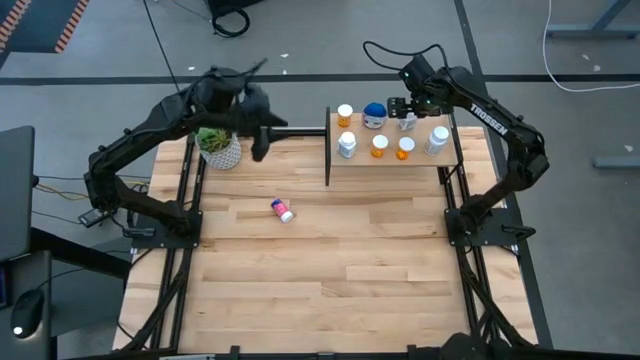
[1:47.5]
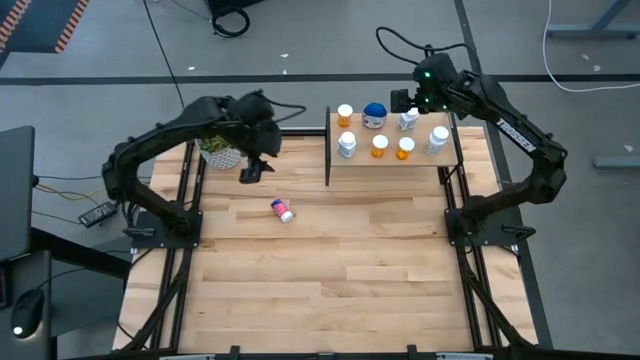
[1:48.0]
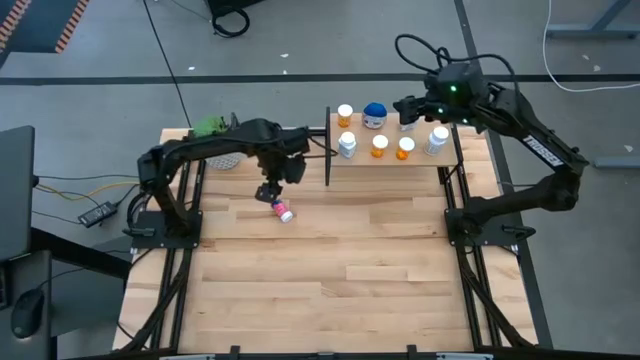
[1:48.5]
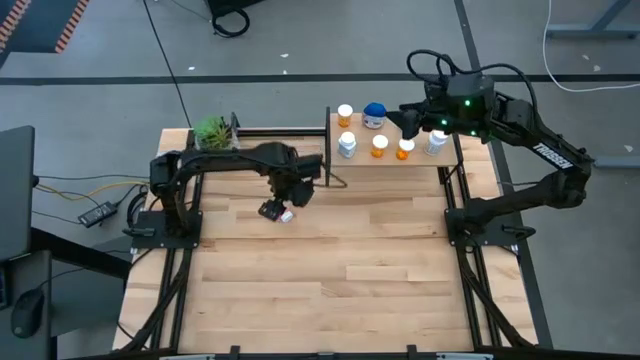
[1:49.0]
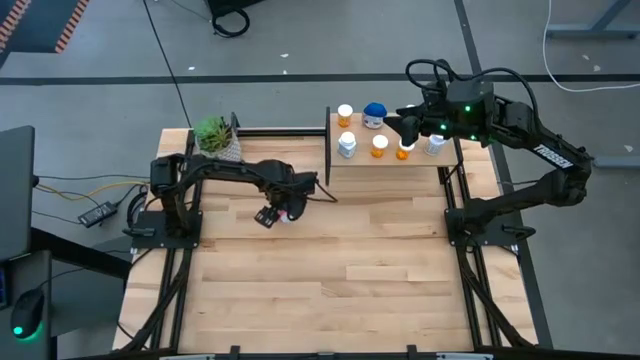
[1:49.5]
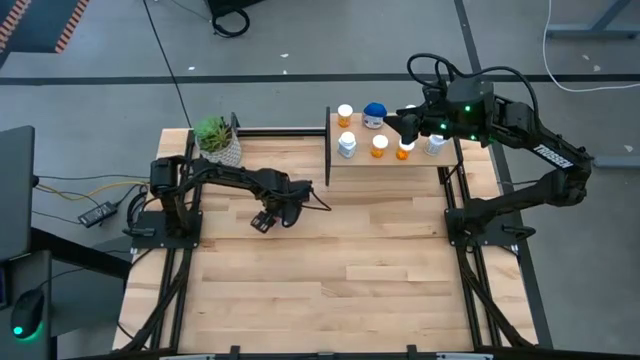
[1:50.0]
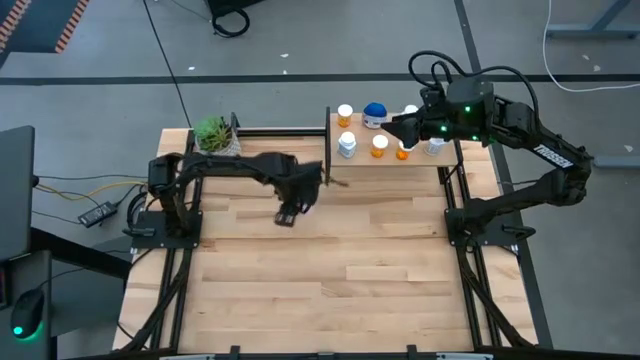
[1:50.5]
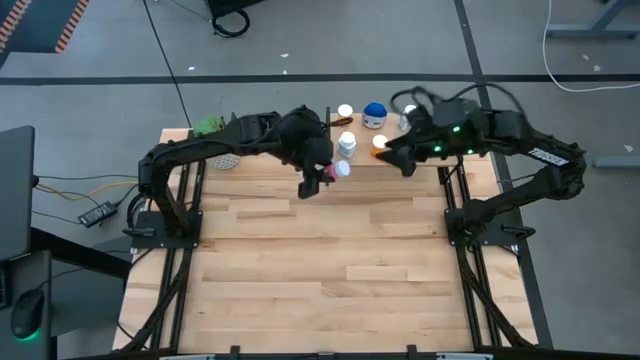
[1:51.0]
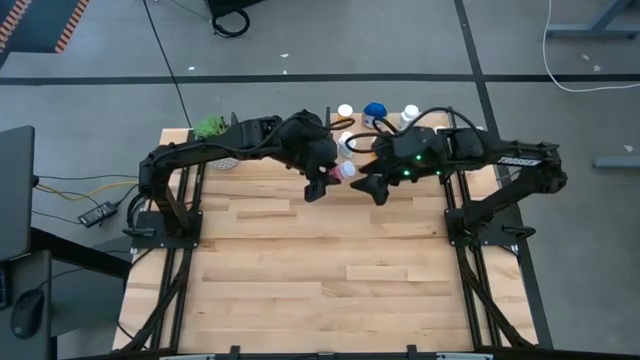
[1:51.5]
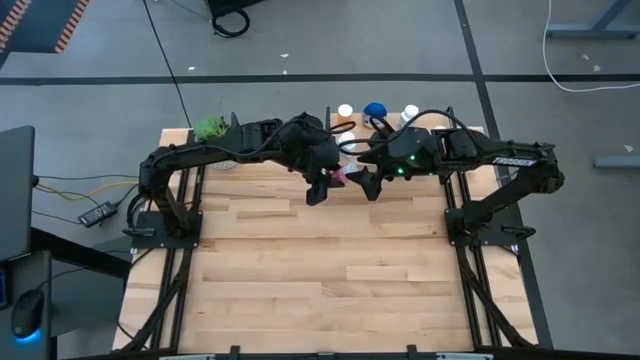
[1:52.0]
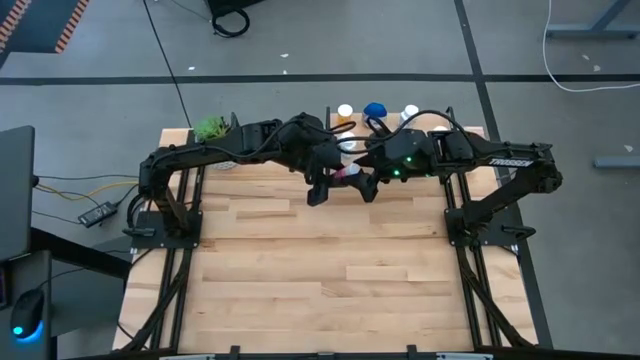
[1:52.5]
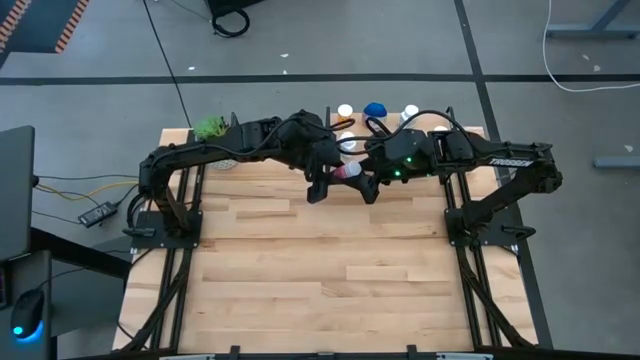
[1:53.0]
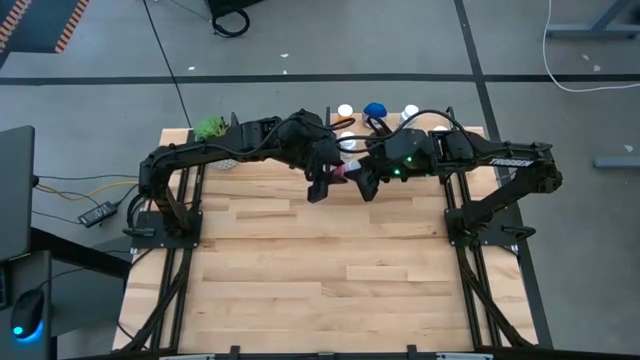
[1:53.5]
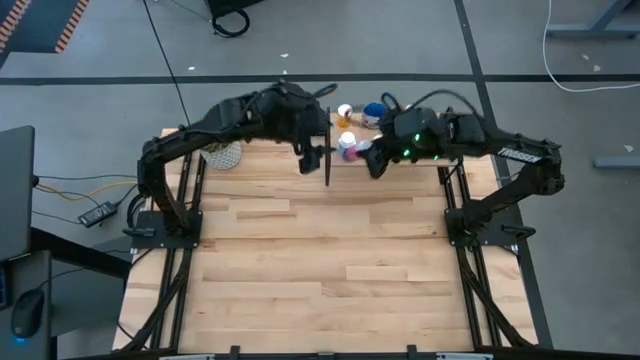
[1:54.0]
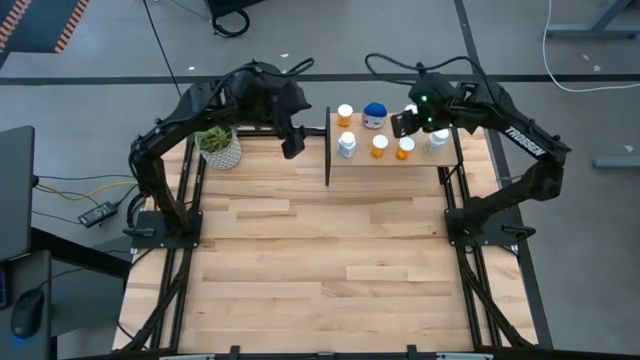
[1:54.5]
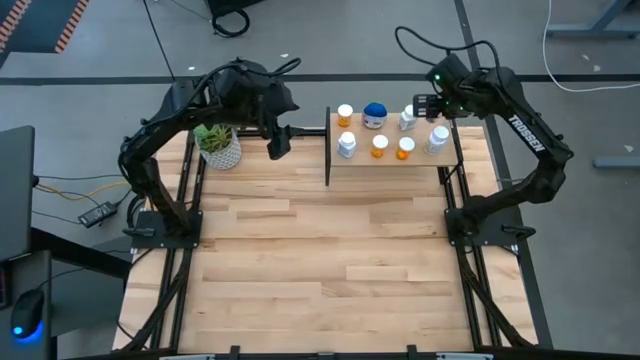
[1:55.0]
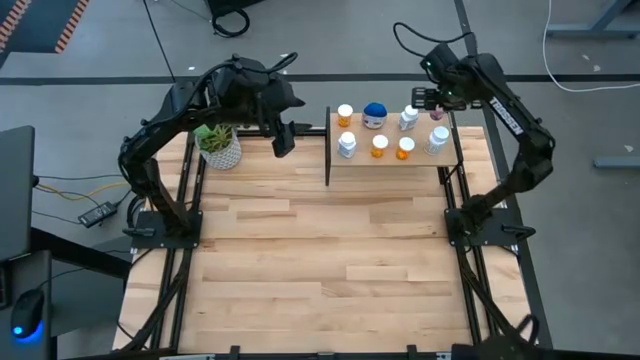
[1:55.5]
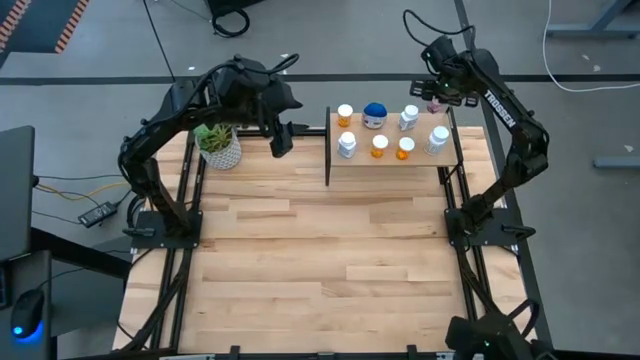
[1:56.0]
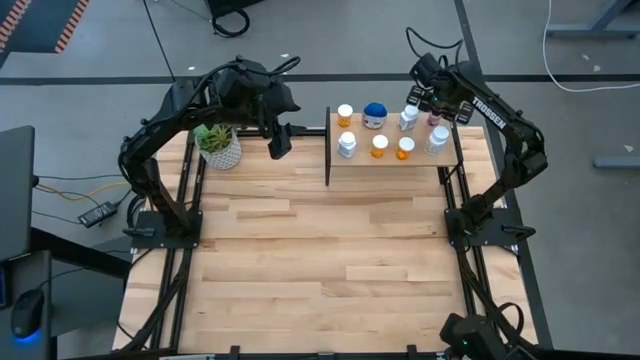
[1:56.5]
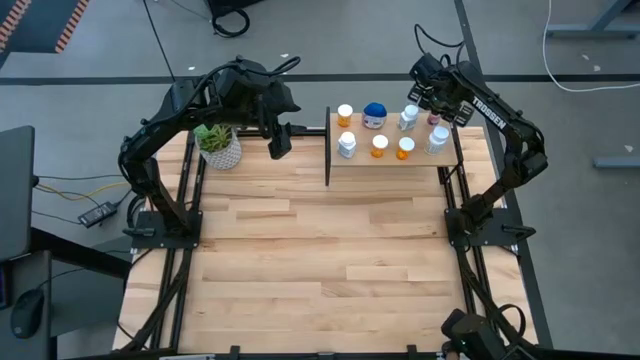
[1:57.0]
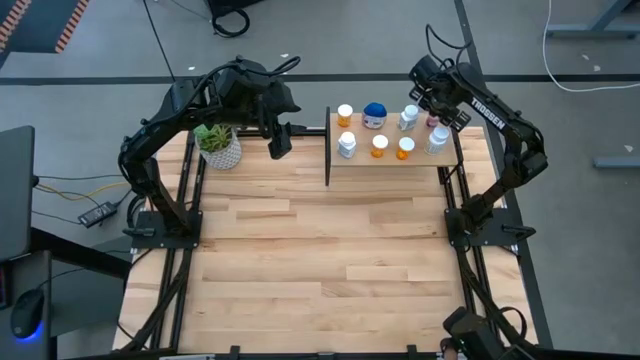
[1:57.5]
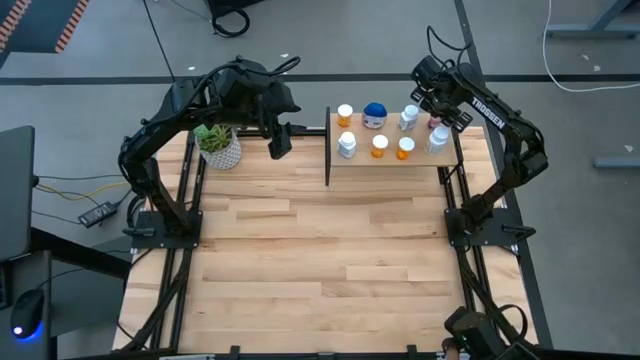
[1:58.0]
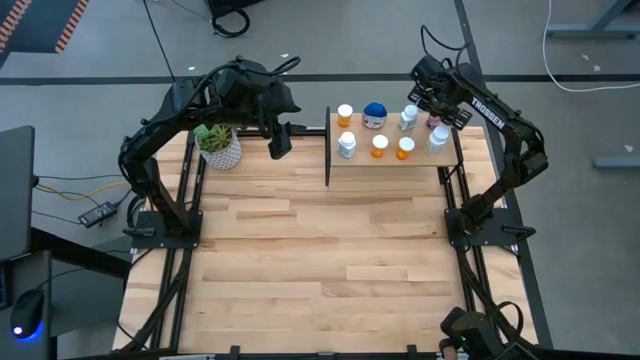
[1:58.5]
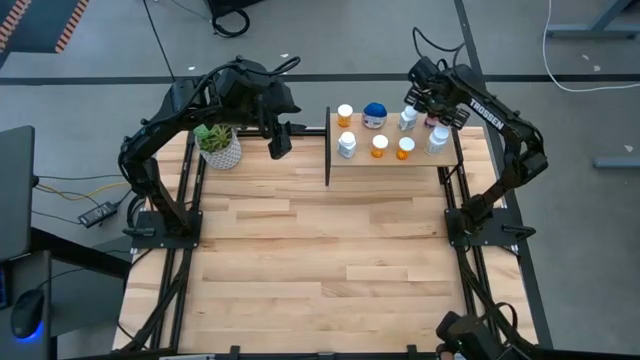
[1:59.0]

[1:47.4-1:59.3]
Task: Pick and place medicine bottles onto shelf by color
Put the pink pill bottle on the shelf aligned with the white green pill bottle

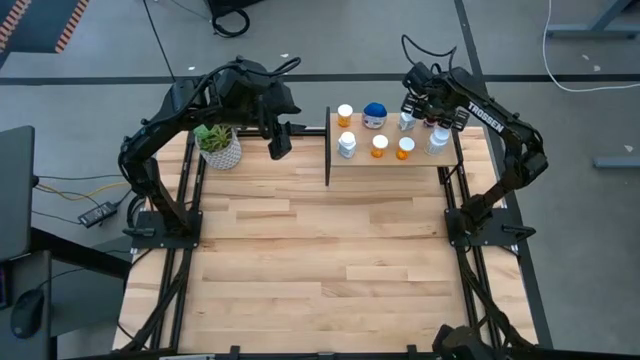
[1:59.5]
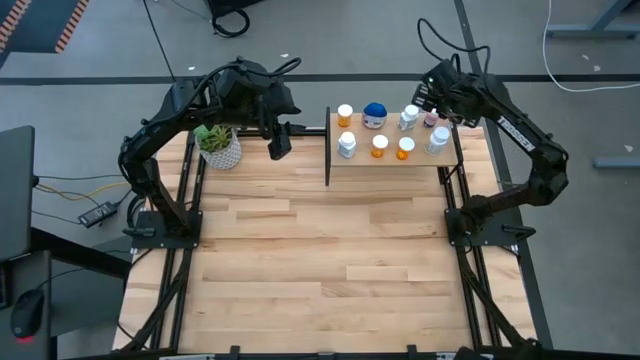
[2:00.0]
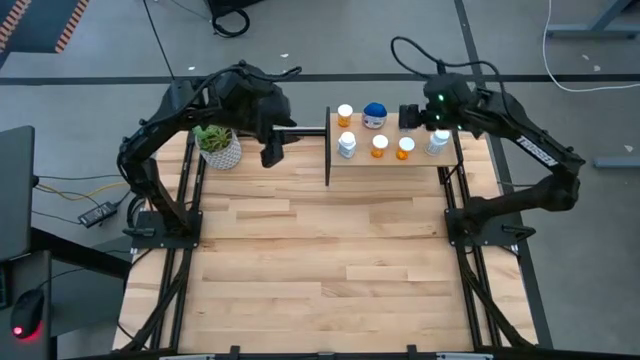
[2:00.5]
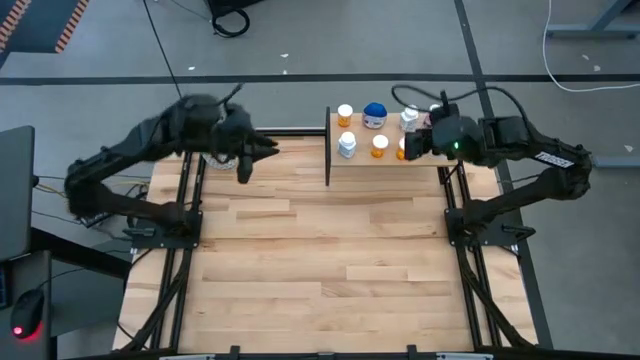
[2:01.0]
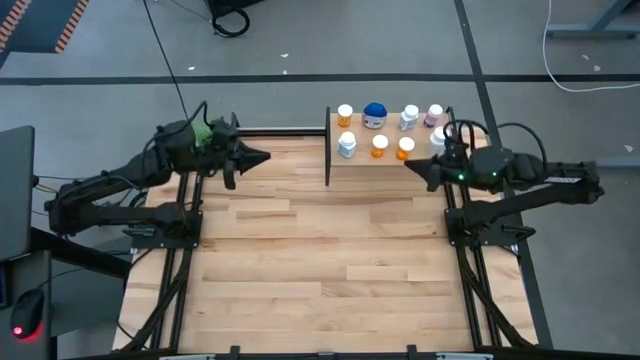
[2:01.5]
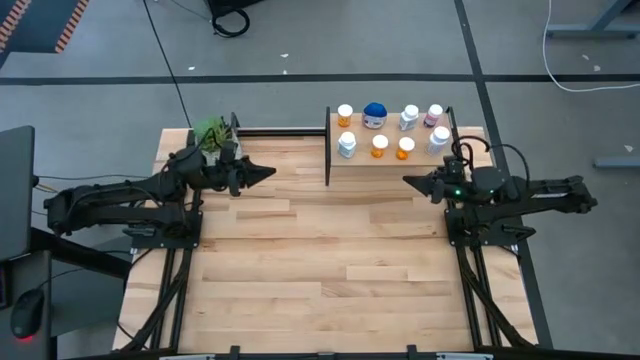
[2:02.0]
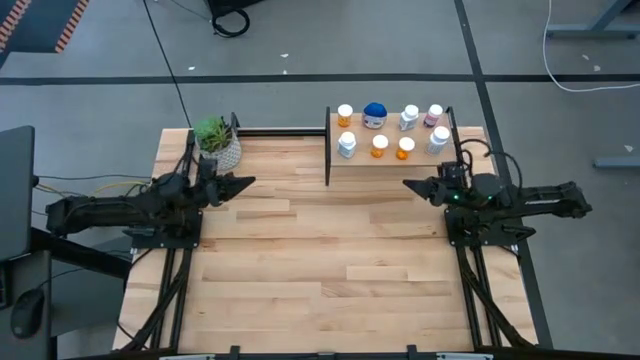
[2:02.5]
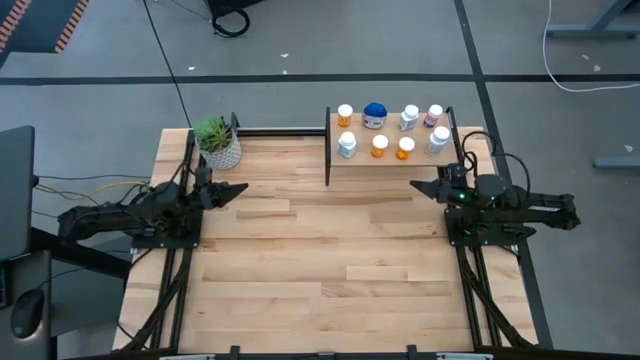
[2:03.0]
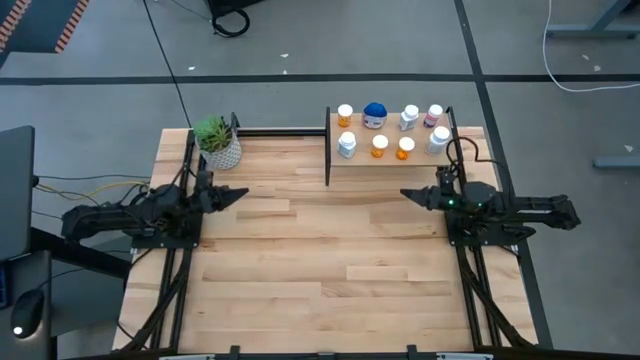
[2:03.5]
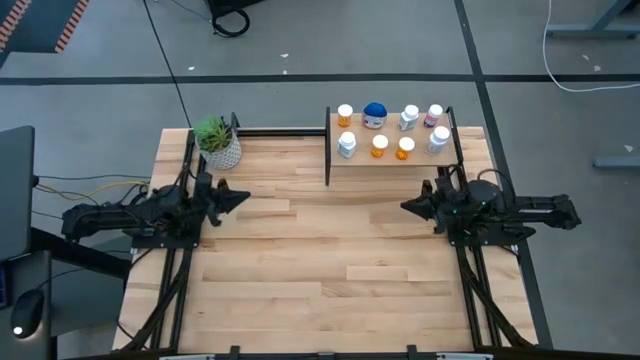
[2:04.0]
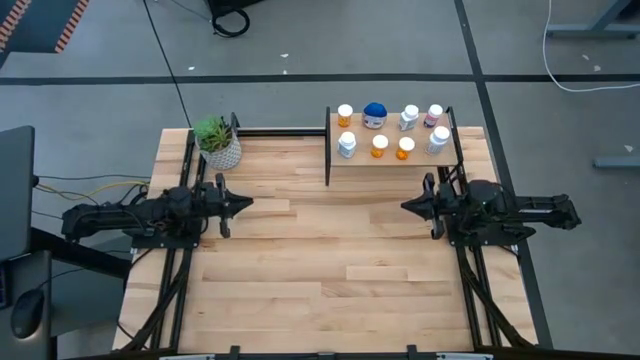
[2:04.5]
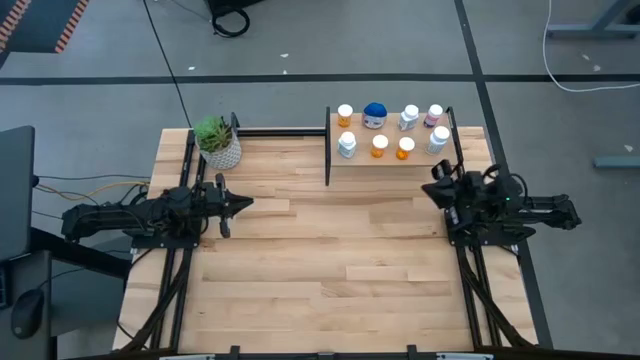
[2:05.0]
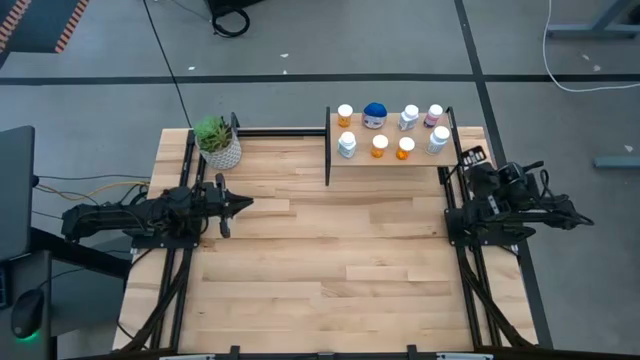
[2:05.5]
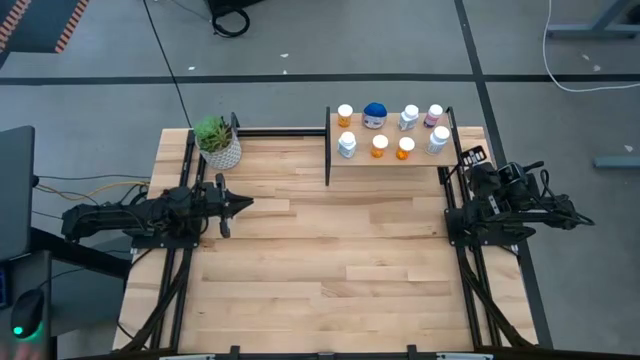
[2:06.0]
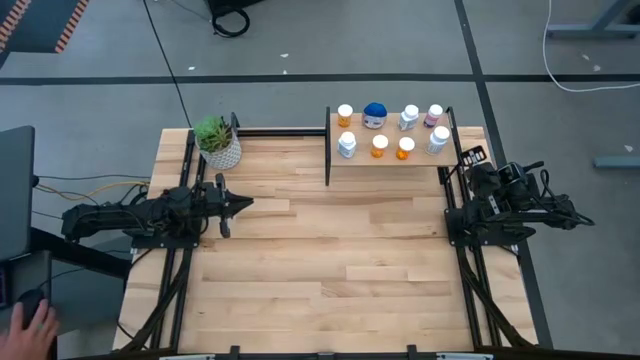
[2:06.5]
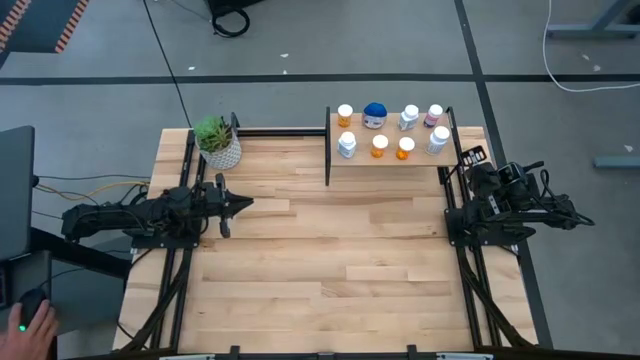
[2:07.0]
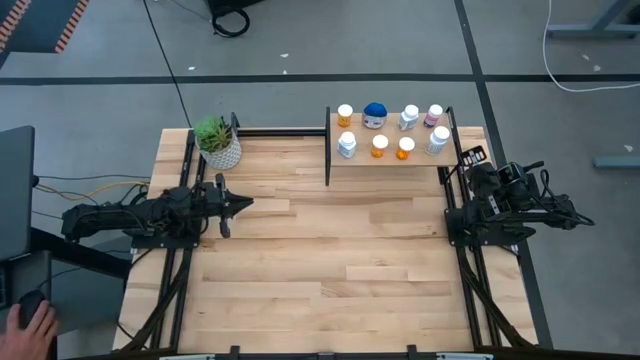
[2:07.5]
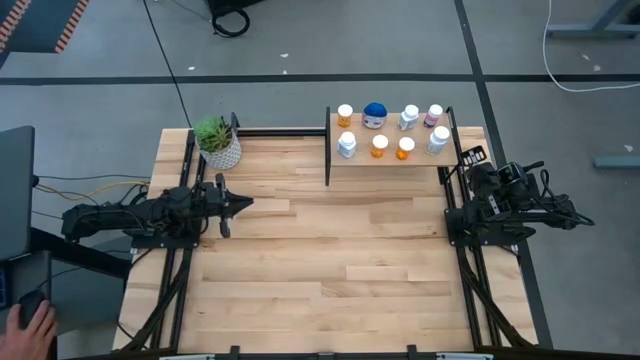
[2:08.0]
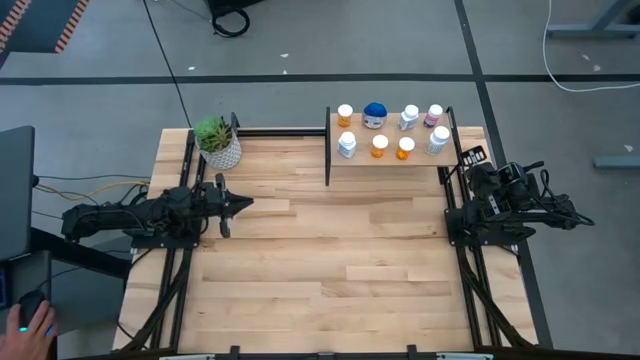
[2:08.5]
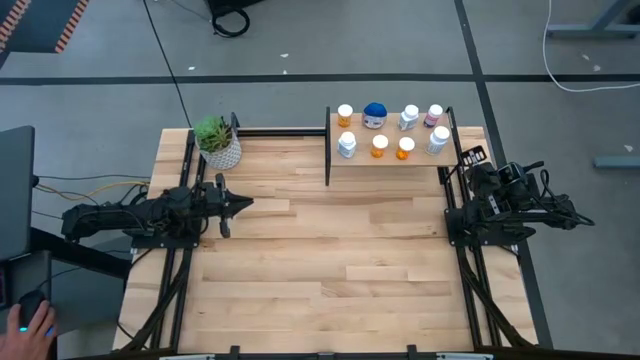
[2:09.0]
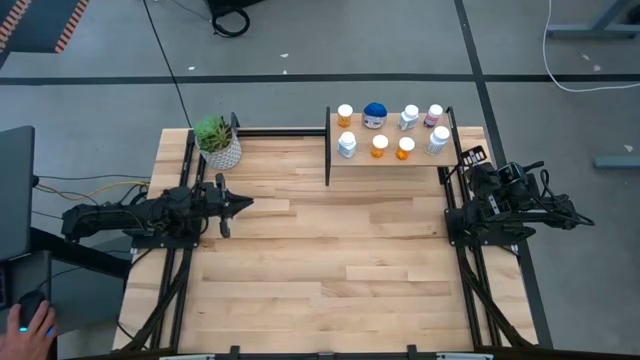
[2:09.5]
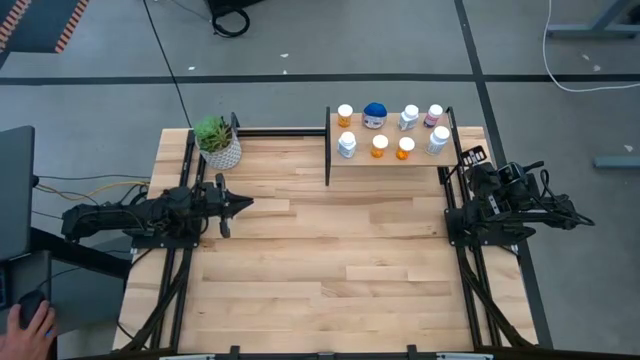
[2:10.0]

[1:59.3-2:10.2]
Return to Home Position
